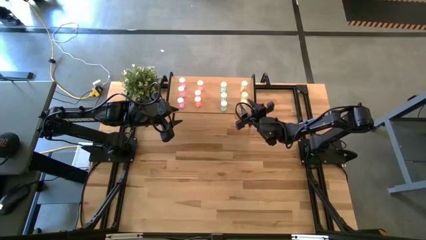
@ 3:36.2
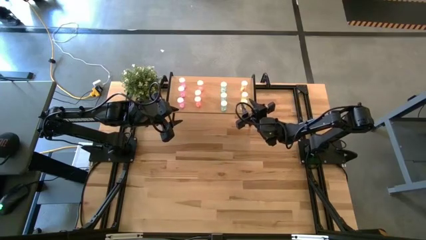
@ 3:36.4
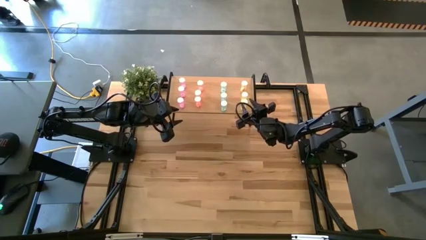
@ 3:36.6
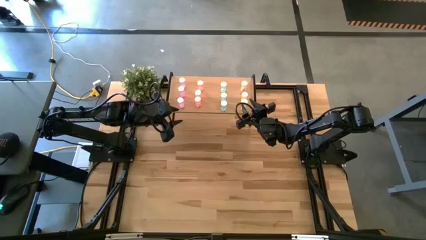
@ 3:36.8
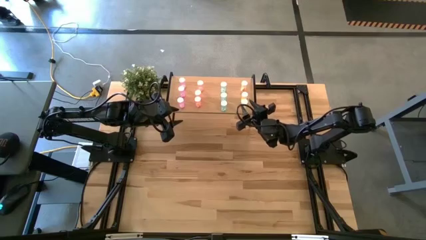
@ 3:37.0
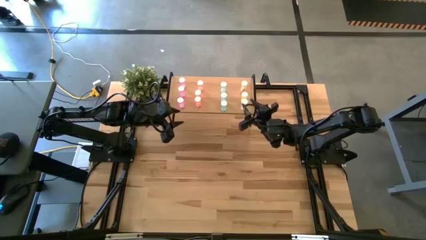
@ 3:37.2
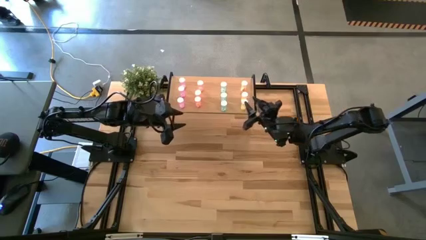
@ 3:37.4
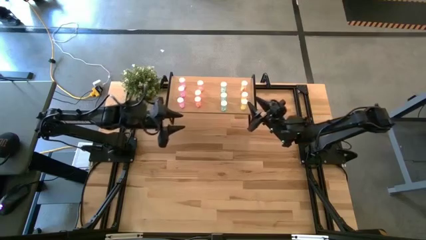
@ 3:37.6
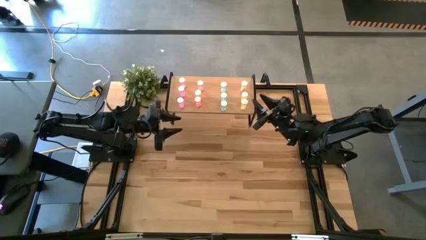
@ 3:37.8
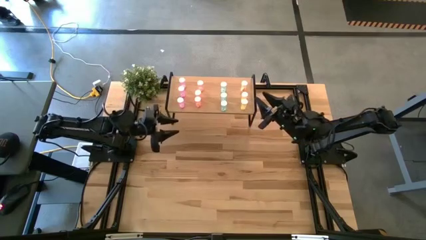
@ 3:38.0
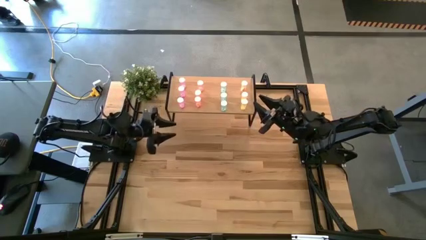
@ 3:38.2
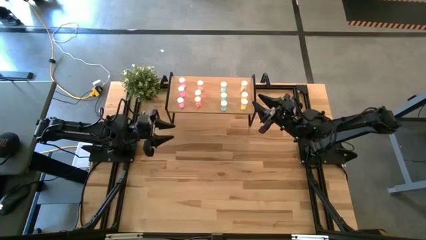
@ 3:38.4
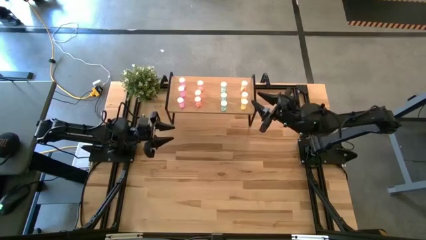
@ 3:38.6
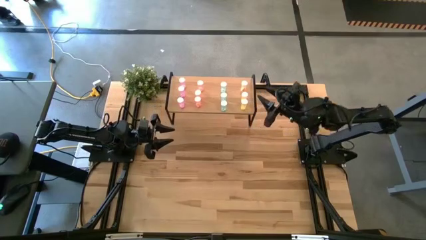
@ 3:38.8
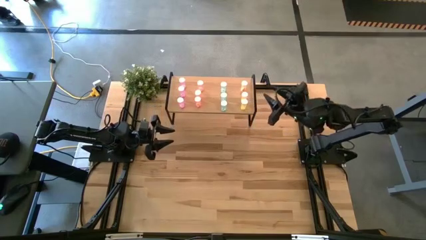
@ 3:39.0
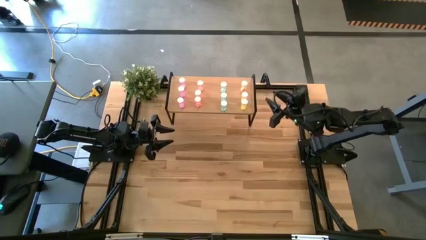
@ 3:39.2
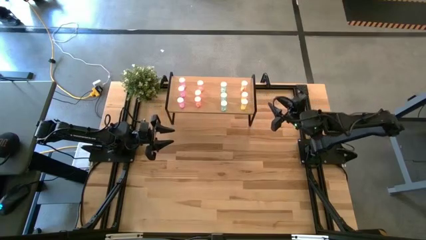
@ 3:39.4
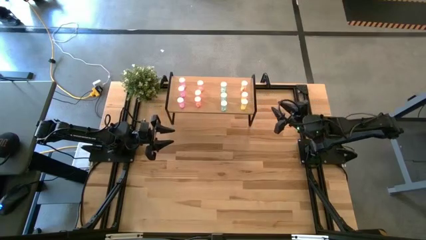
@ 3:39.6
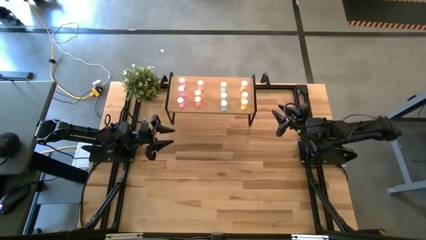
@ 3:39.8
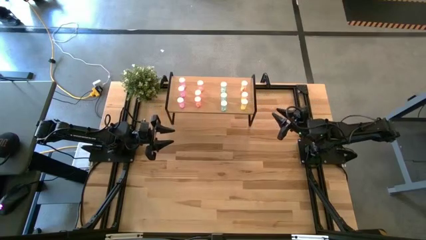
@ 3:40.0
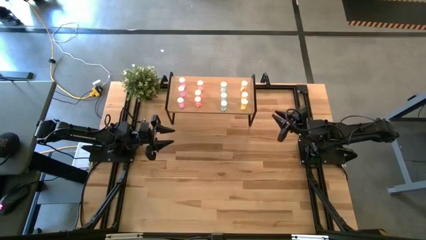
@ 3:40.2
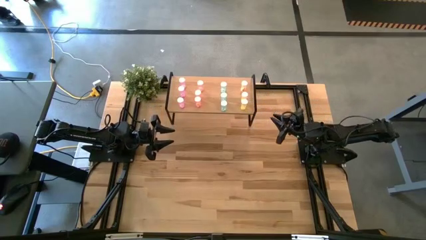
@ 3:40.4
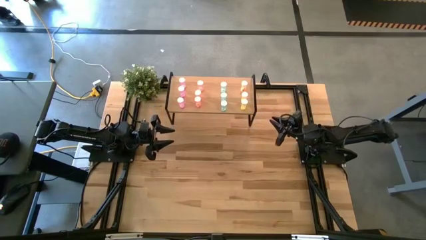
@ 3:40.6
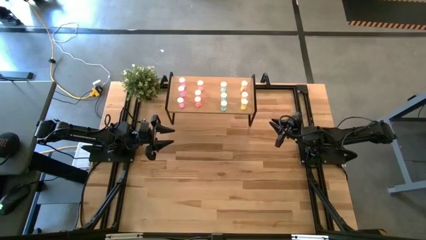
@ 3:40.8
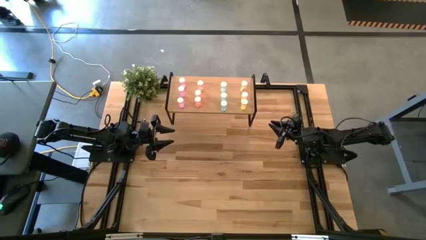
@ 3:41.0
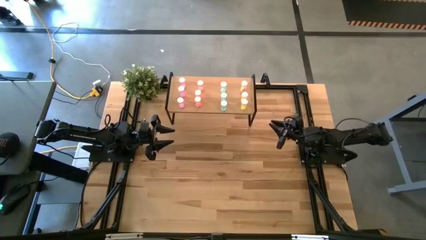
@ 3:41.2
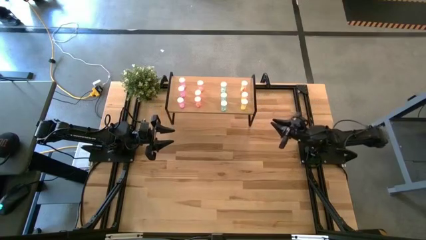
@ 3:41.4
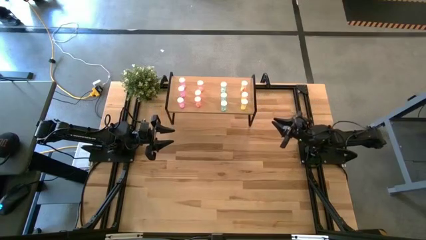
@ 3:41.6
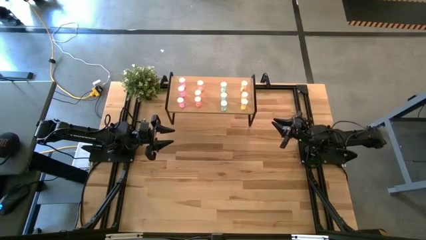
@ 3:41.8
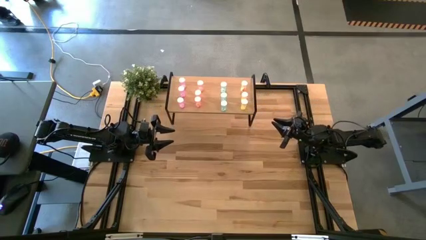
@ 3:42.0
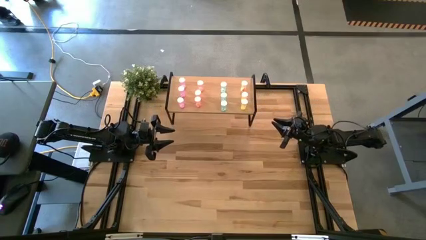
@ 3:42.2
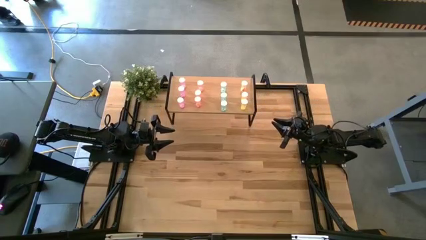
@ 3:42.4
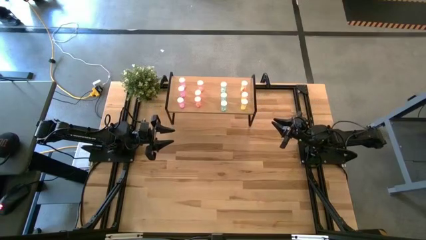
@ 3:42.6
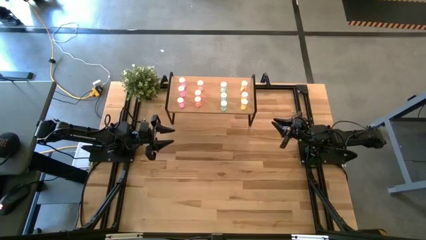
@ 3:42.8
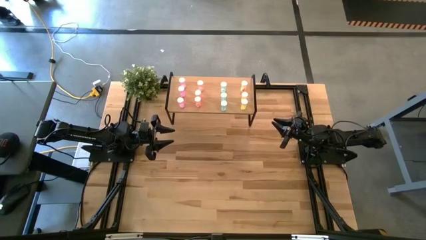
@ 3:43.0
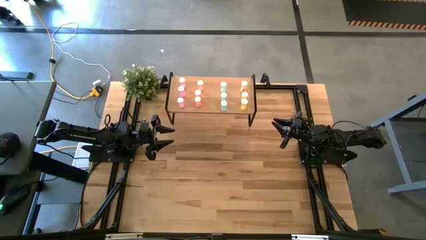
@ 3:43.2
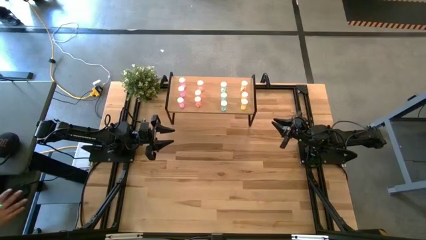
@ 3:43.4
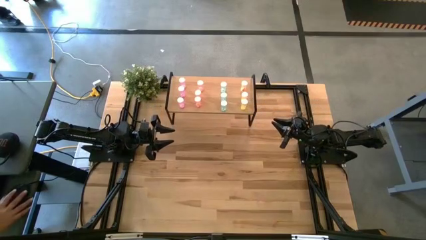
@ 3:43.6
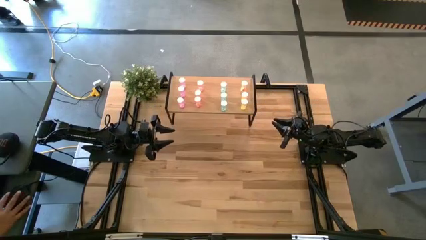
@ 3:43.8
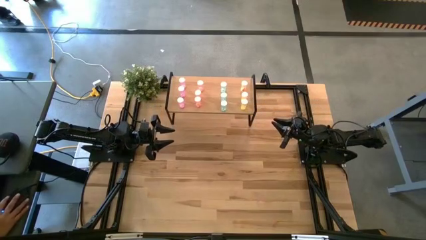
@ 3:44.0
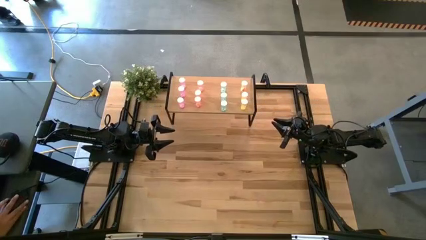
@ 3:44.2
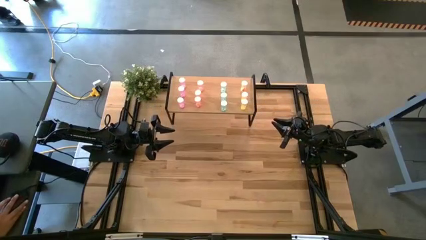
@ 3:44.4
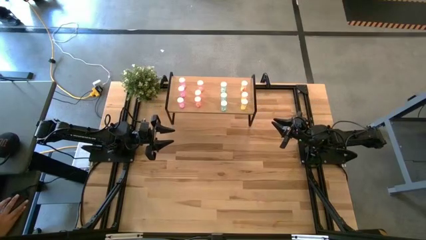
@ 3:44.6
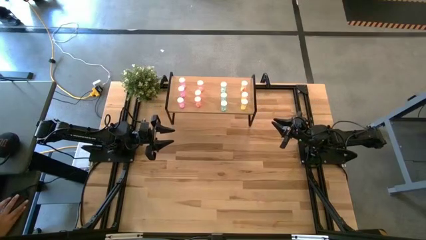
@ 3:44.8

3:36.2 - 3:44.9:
Task: Pick and place medicine bottles onto shelf by color
Return to Home Position
